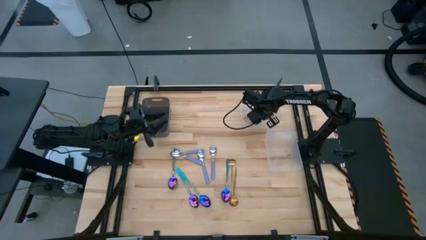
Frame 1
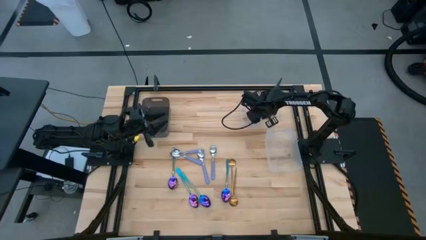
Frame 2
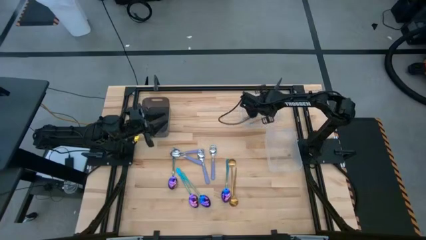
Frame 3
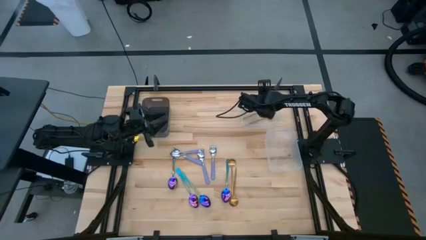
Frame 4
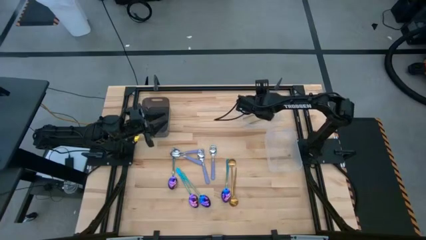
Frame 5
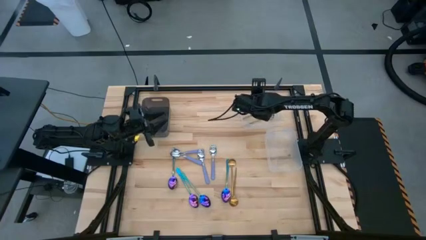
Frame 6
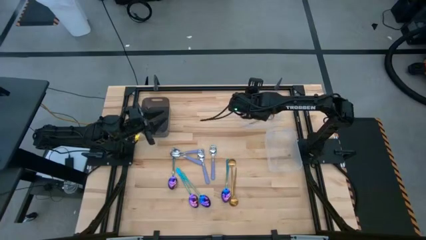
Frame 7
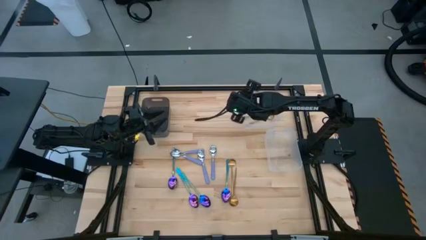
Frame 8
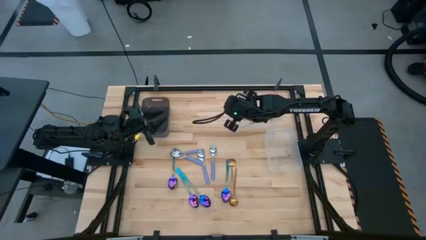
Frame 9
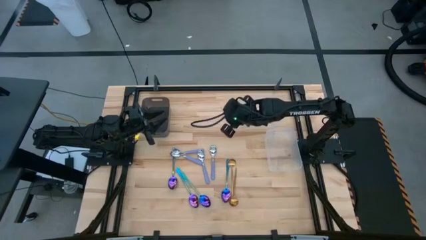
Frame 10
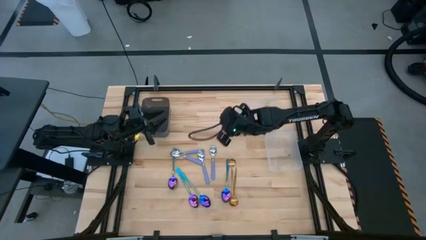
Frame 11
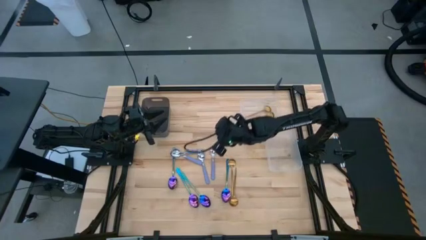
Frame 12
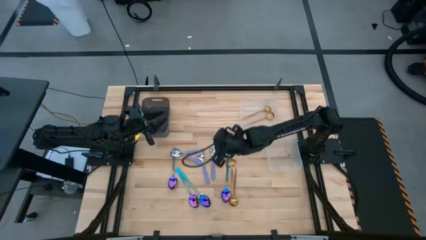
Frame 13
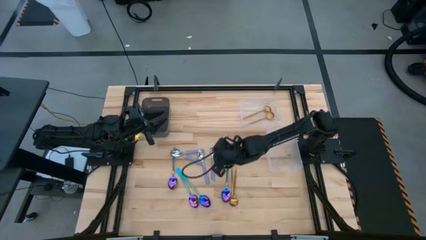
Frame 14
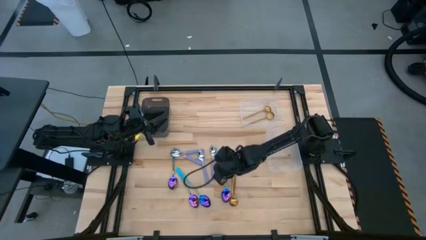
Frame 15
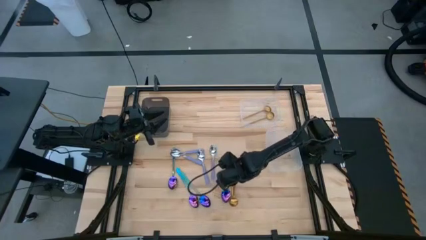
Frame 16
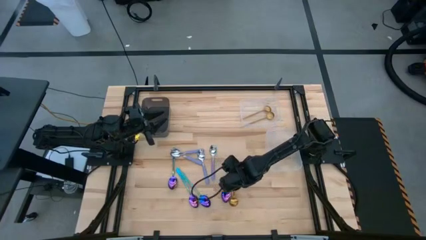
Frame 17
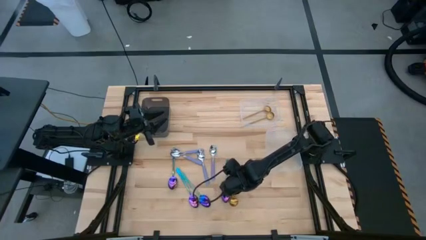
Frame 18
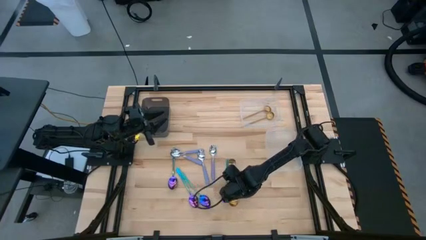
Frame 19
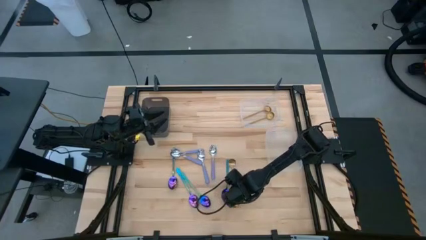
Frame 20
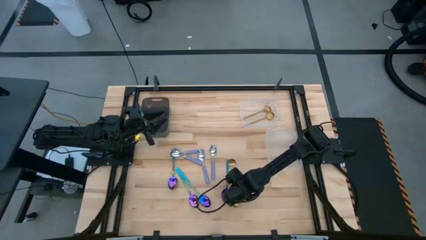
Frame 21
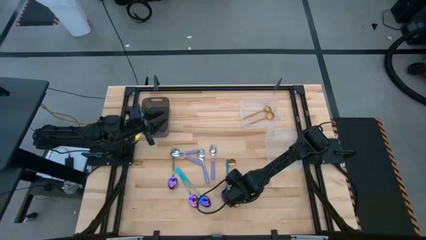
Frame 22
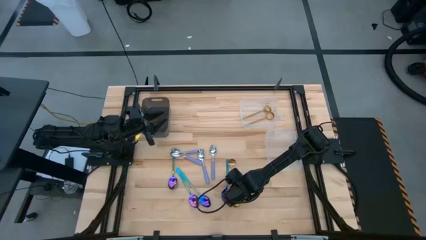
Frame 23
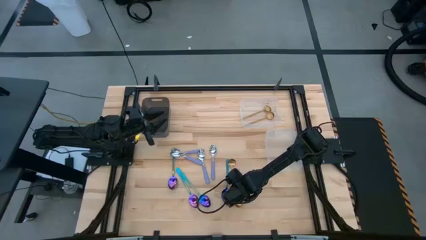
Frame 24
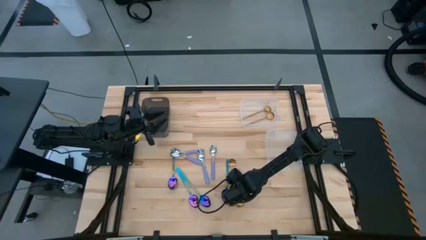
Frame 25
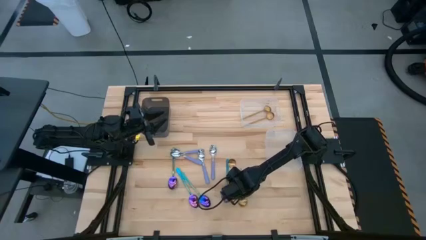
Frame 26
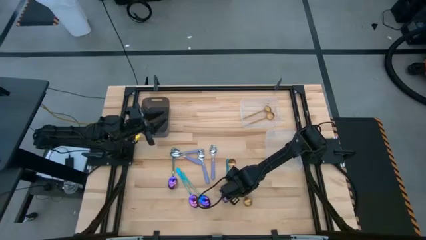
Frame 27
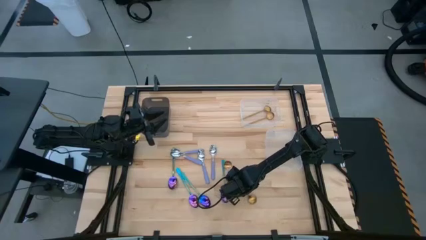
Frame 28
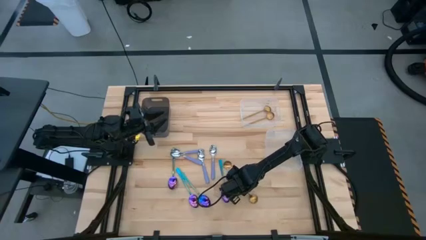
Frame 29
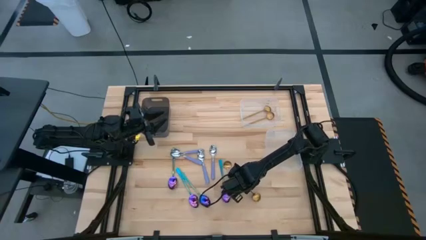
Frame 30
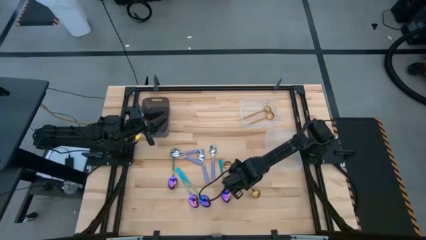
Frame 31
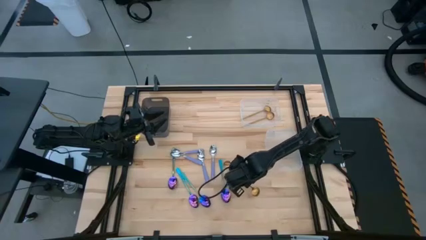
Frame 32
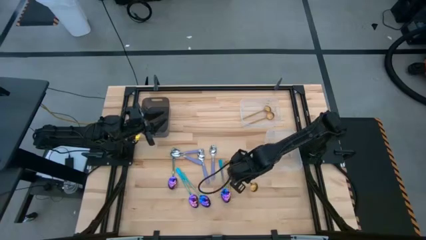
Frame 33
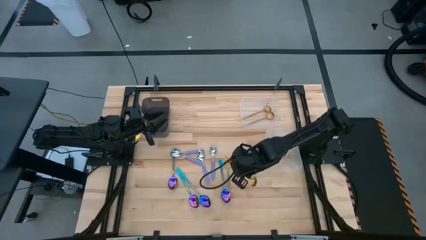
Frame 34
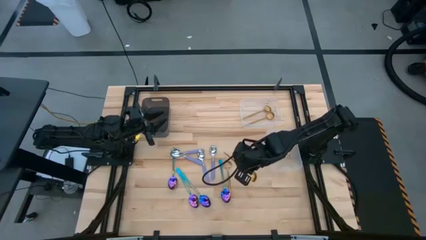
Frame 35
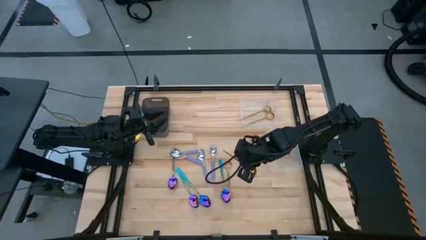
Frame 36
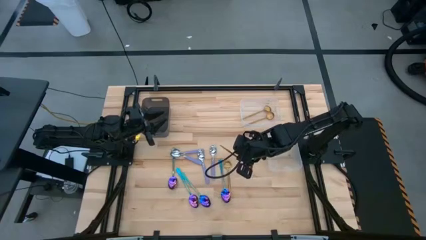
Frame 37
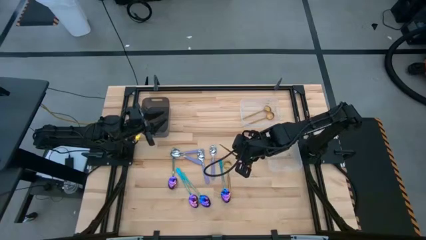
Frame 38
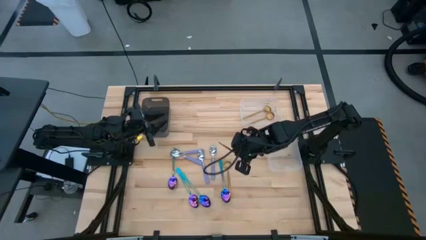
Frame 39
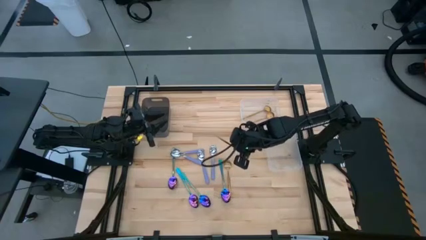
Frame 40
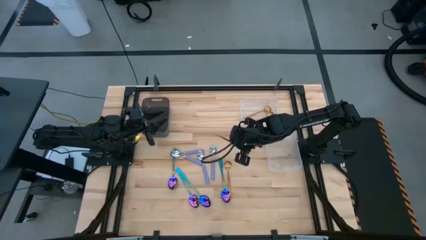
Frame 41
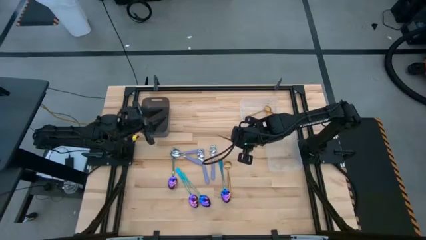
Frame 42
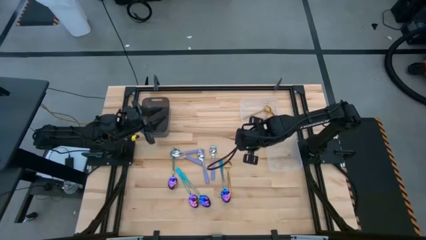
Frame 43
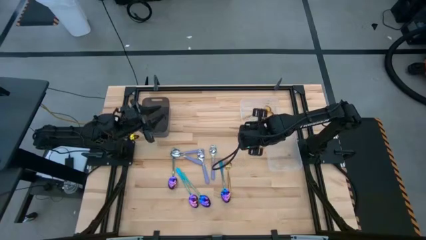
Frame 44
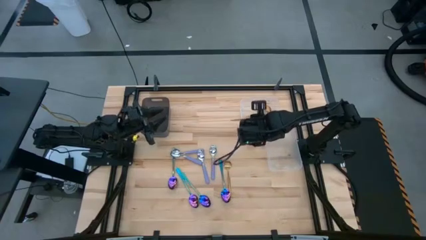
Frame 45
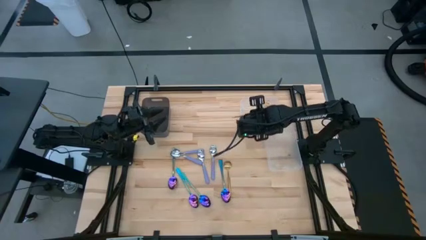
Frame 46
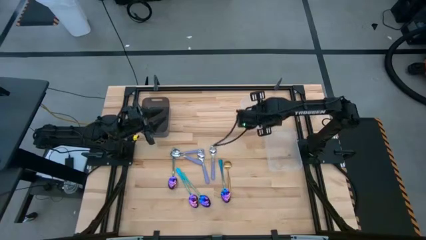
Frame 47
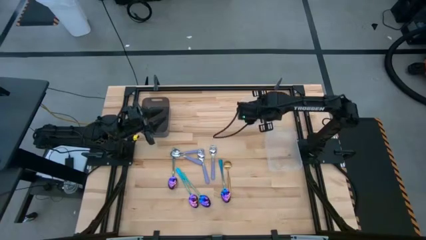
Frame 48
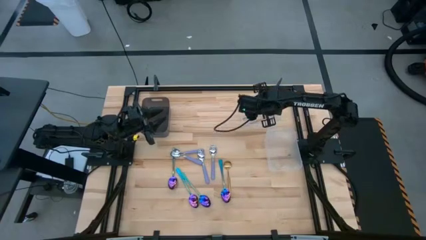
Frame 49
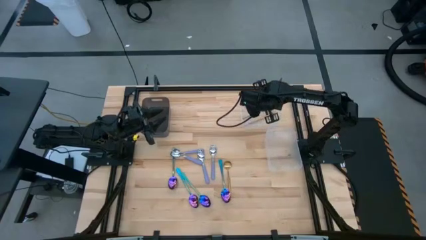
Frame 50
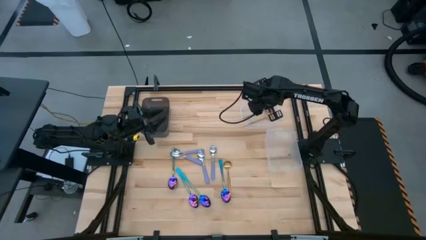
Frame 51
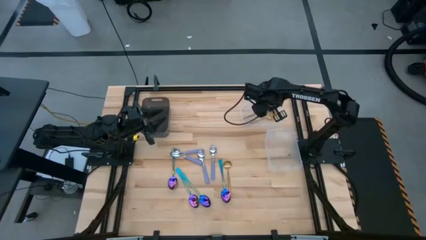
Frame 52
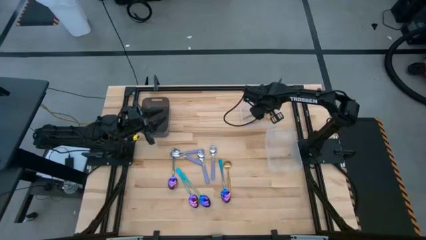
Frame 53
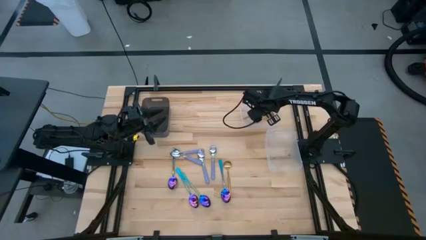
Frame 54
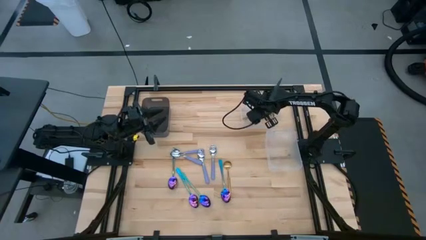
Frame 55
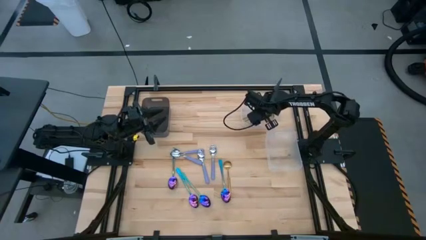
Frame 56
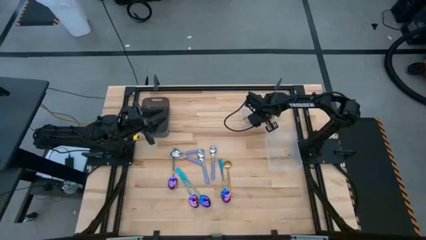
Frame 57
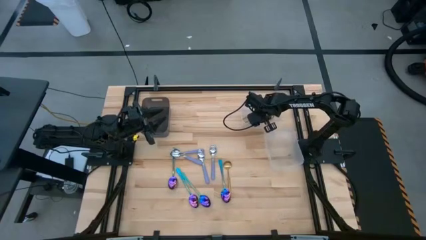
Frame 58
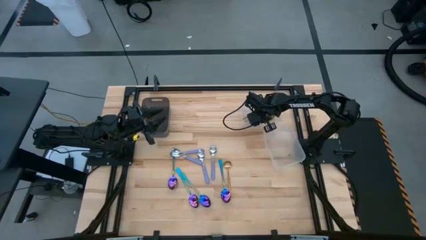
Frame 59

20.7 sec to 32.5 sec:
Task: Sort silverware by color (type)
Put the gold spoon into the top transparent bin

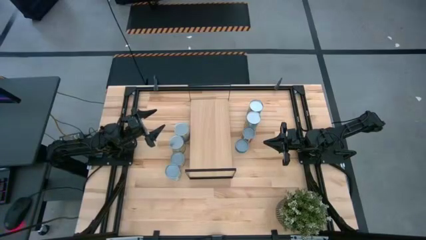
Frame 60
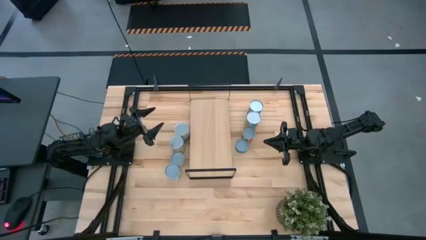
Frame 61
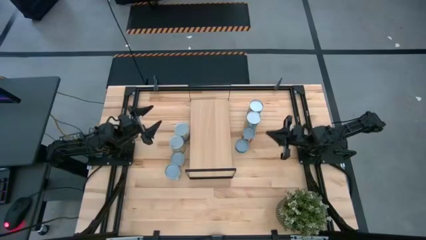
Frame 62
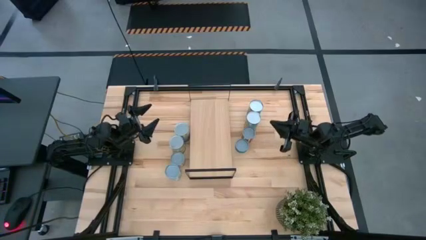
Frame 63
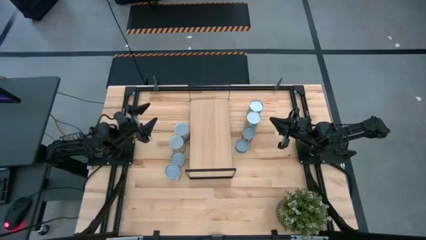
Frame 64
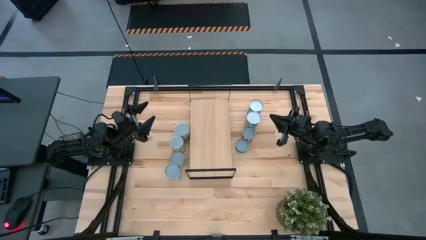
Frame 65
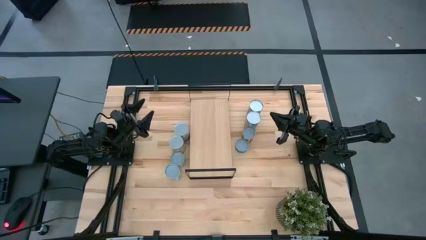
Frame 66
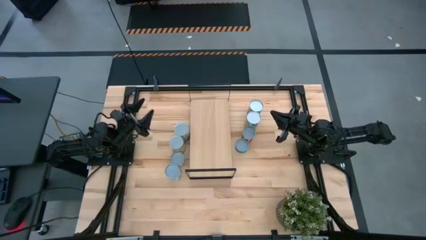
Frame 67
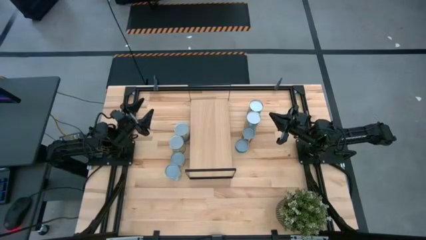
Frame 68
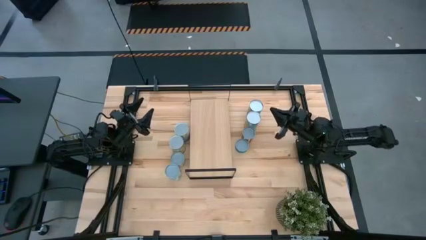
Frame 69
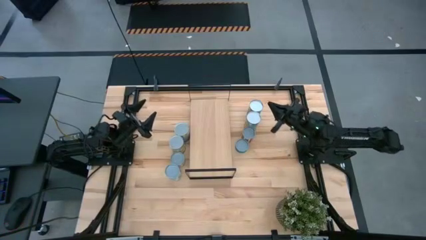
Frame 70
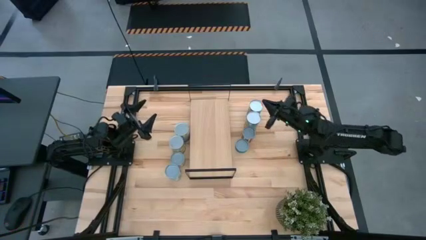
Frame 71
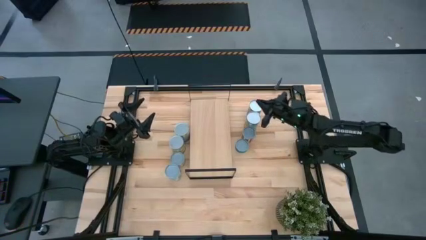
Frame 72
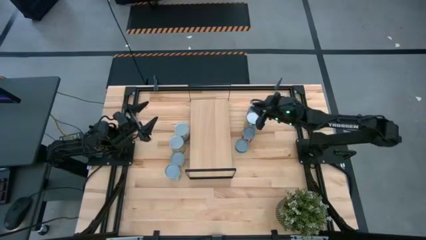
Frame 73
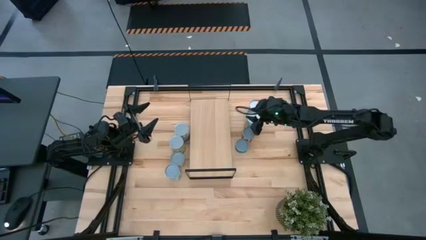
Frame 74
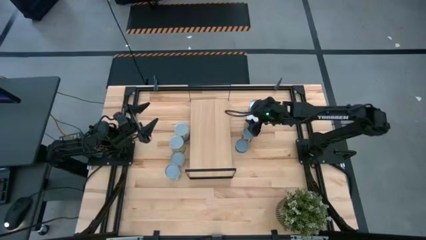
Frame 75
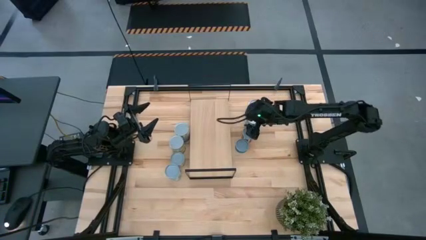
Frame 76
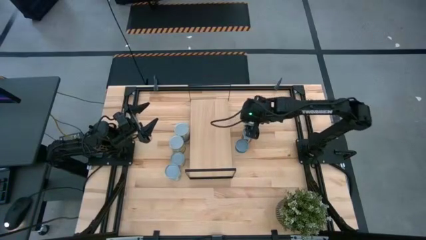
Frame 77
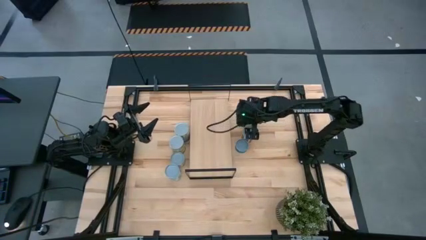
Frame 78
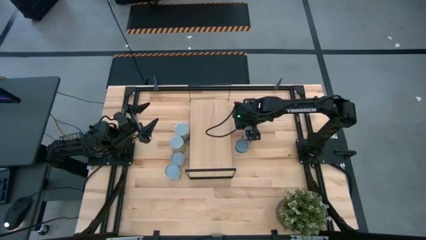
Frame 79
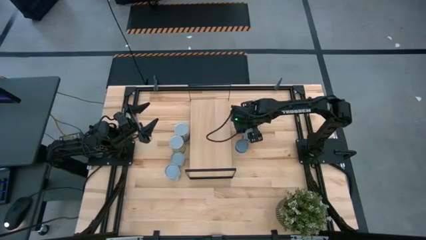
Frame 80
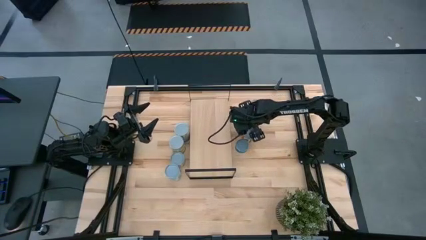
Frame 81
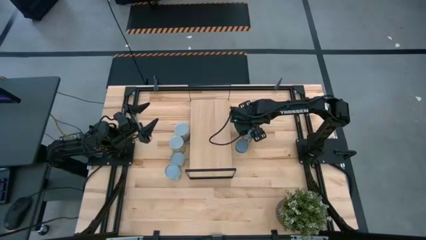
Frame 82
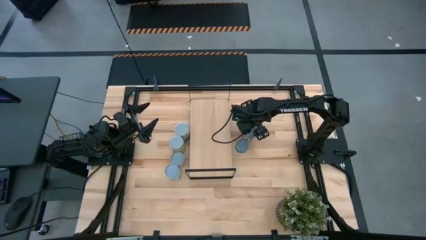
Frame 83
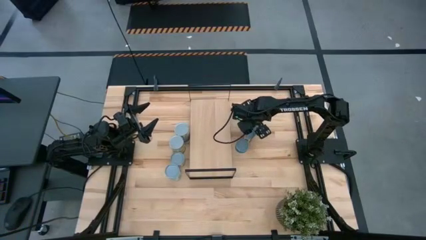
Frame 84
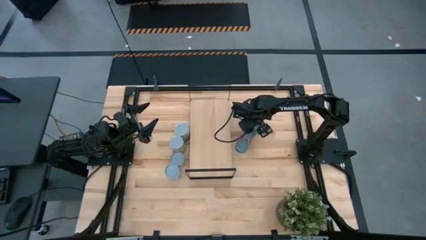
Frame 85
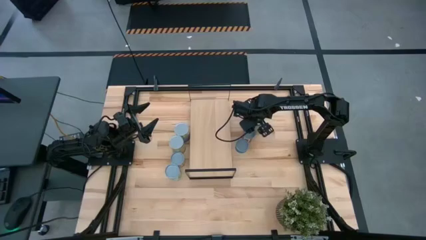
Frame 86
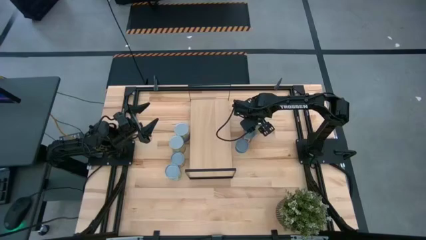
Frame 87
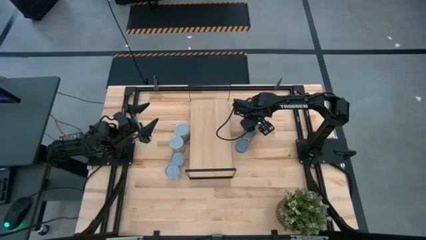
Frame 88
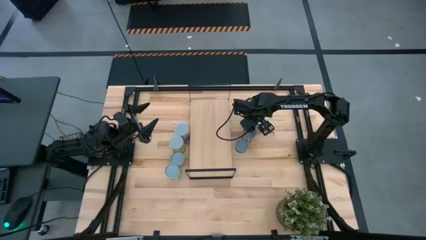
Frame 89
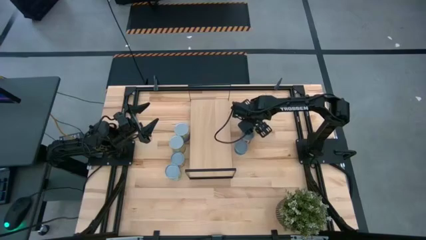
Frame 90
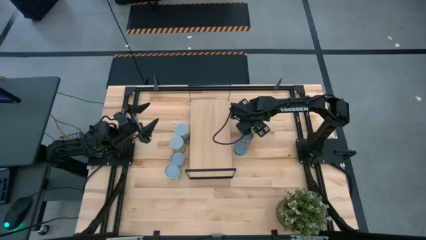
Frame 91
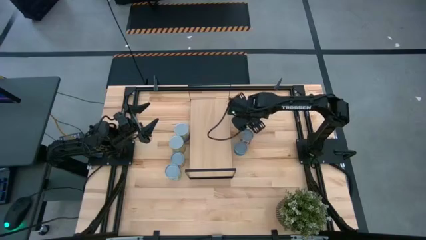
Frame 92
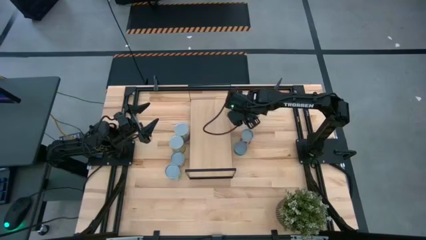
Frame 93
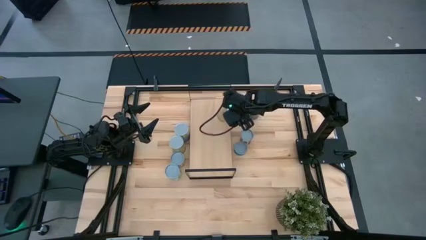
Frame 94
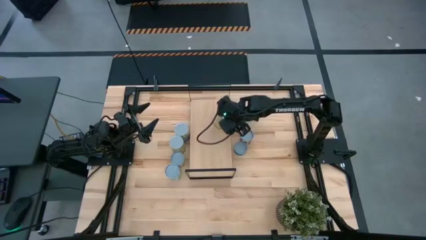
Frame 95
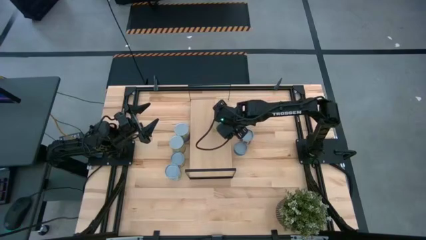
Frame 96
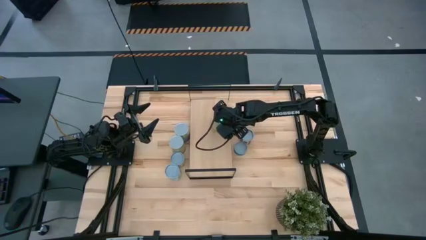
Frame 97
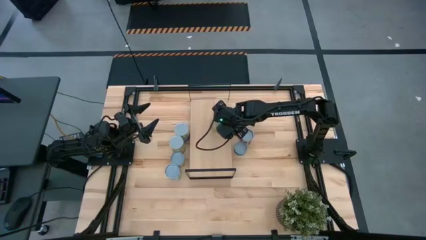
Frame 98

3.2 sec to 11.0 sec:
Task: Pick and place cans onto a shelf
Put the canned carrots onto the shelf
